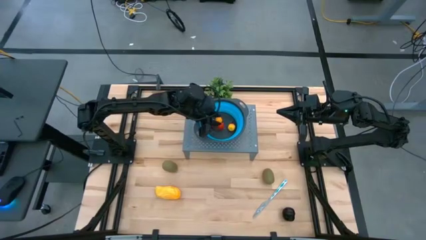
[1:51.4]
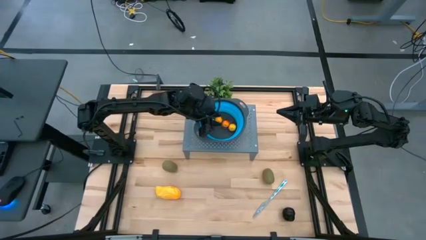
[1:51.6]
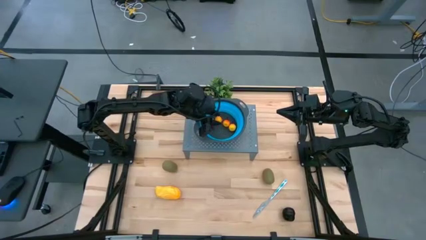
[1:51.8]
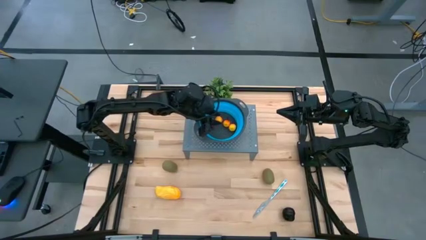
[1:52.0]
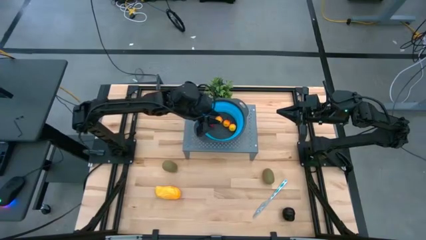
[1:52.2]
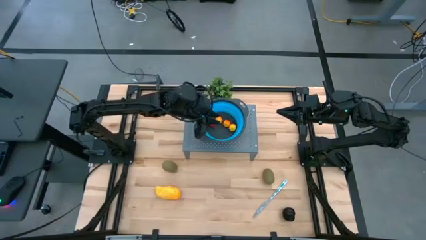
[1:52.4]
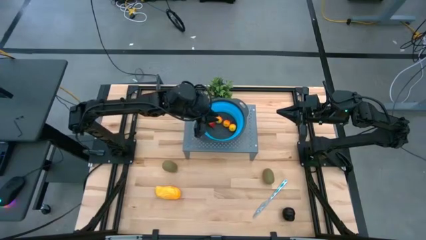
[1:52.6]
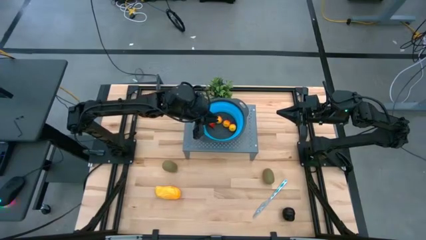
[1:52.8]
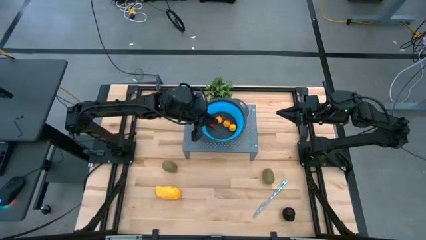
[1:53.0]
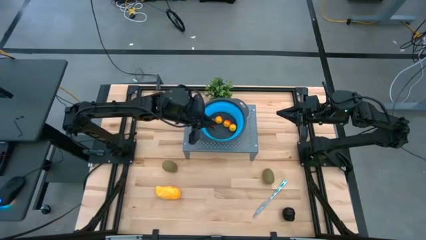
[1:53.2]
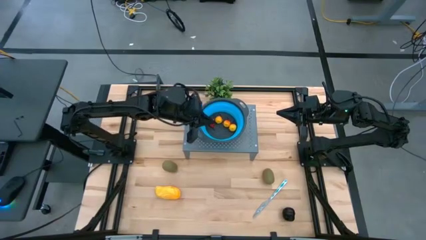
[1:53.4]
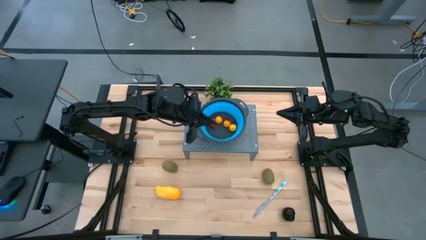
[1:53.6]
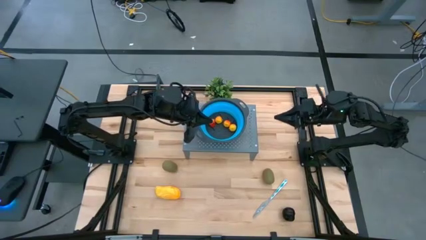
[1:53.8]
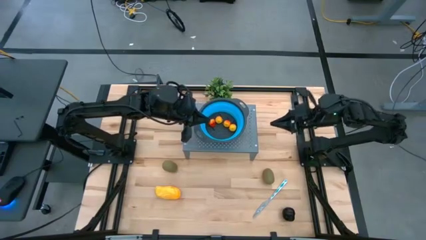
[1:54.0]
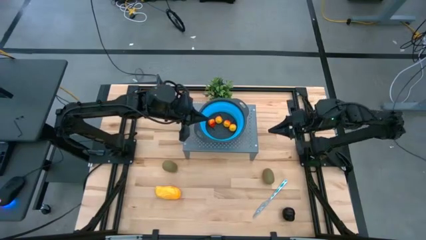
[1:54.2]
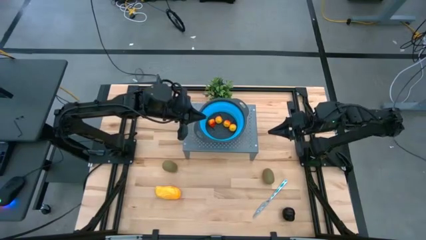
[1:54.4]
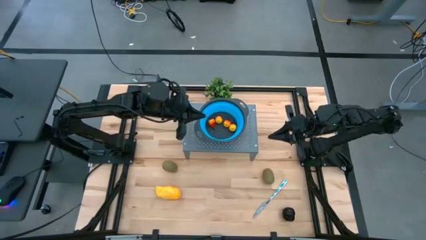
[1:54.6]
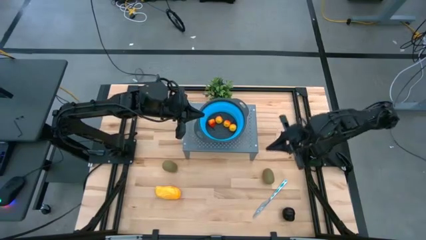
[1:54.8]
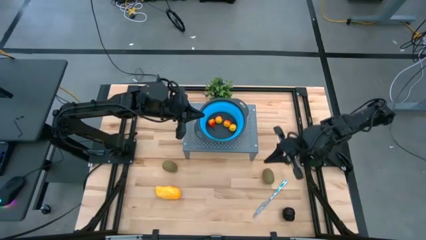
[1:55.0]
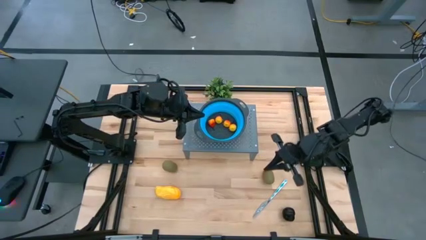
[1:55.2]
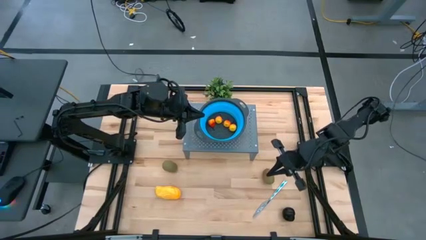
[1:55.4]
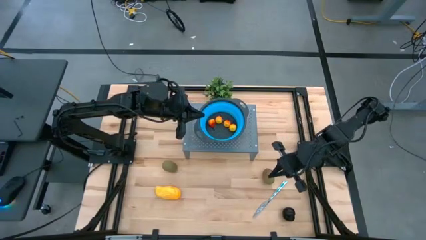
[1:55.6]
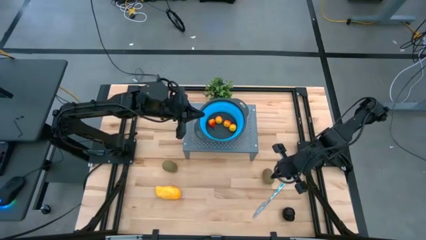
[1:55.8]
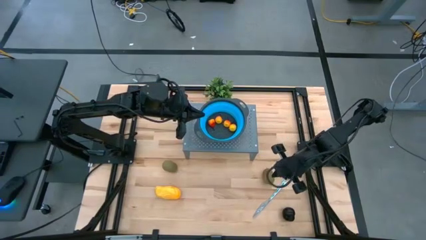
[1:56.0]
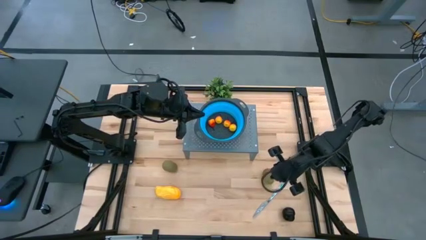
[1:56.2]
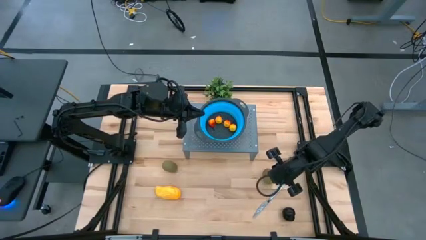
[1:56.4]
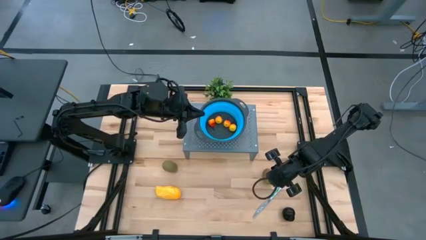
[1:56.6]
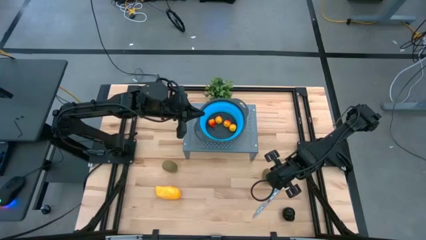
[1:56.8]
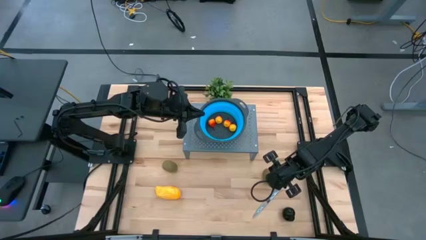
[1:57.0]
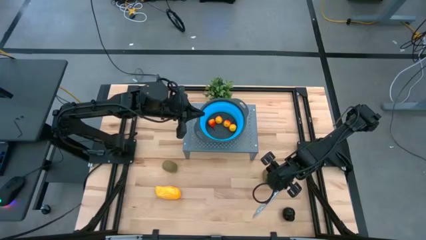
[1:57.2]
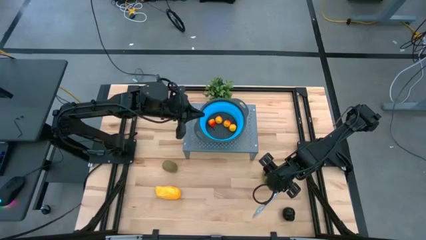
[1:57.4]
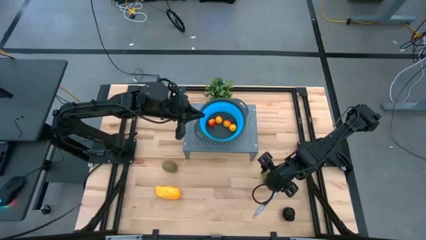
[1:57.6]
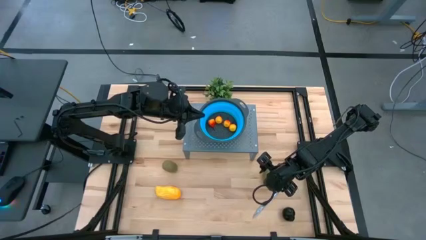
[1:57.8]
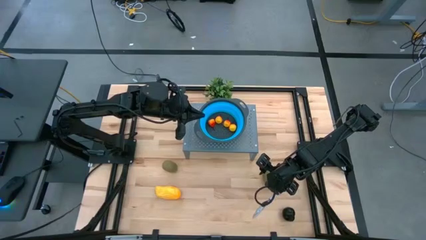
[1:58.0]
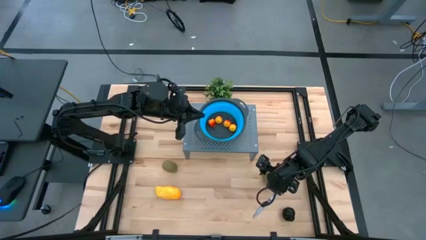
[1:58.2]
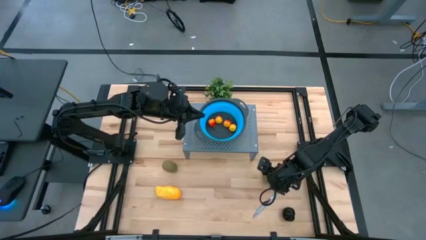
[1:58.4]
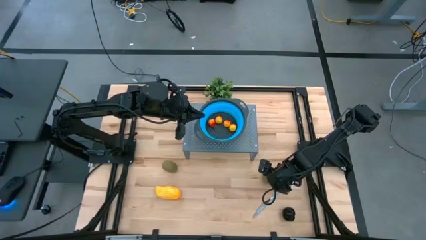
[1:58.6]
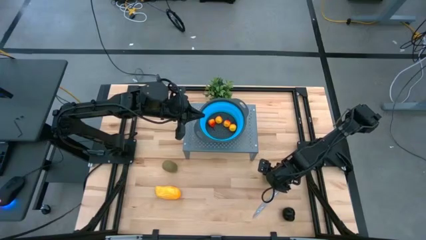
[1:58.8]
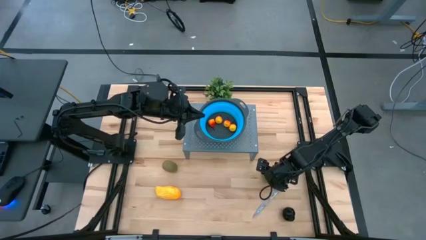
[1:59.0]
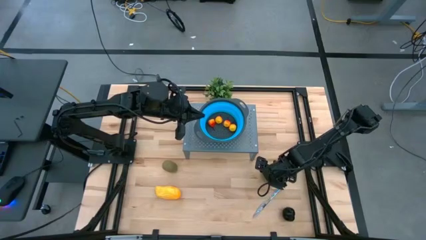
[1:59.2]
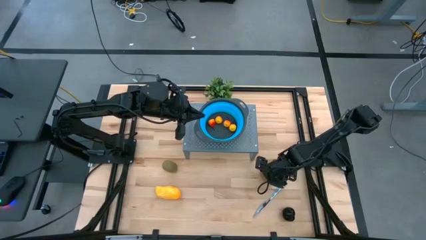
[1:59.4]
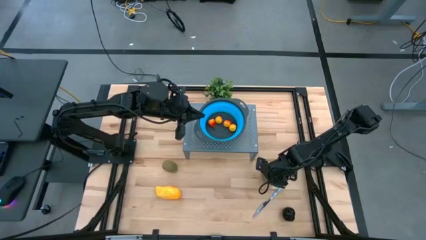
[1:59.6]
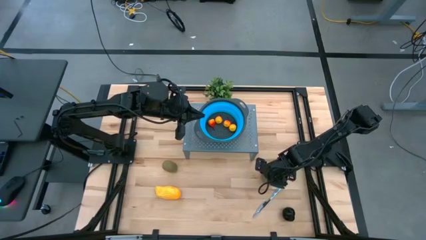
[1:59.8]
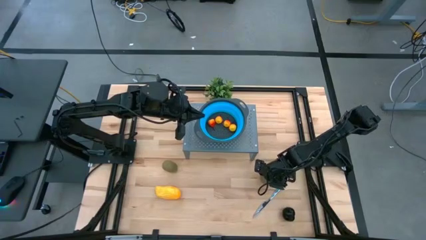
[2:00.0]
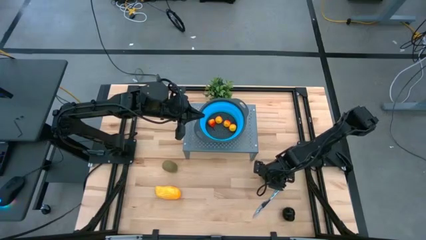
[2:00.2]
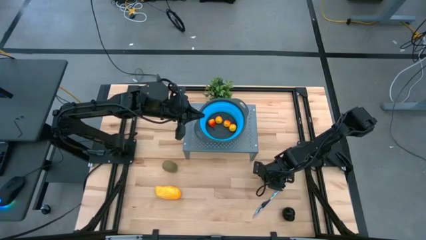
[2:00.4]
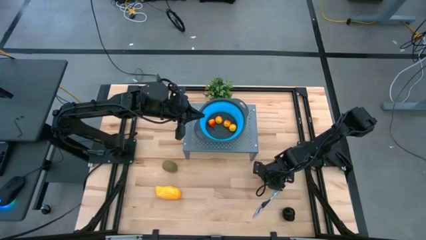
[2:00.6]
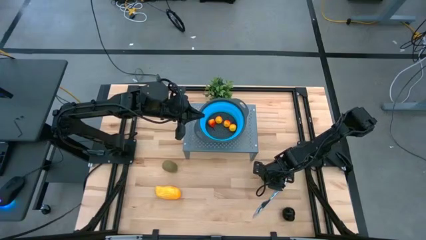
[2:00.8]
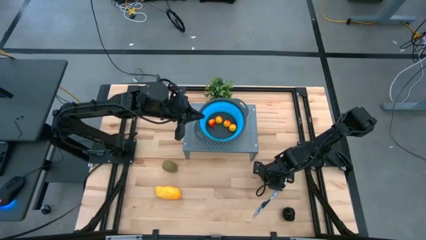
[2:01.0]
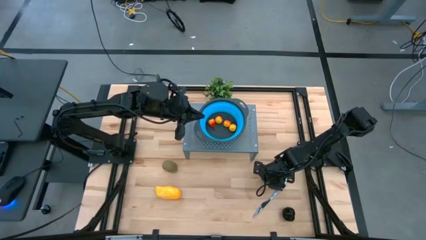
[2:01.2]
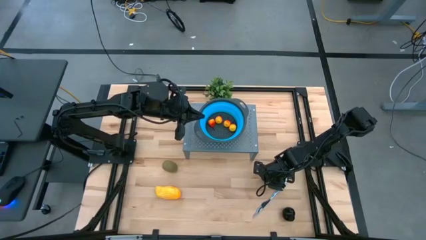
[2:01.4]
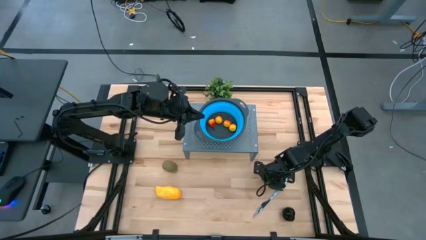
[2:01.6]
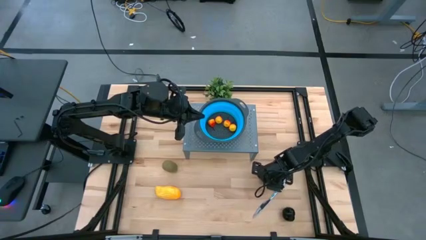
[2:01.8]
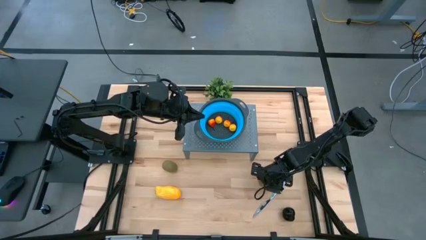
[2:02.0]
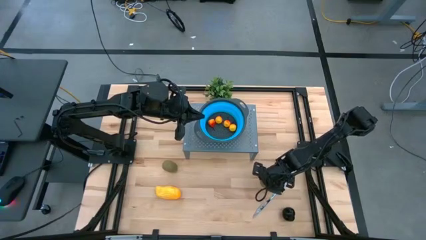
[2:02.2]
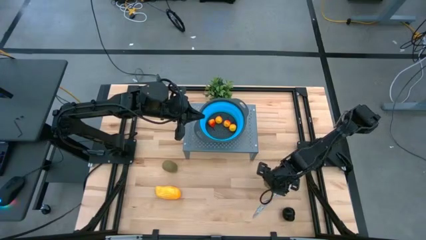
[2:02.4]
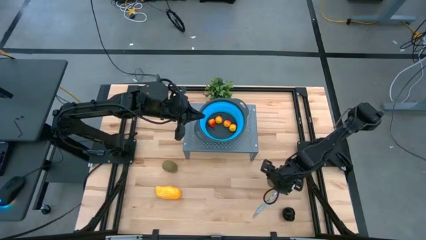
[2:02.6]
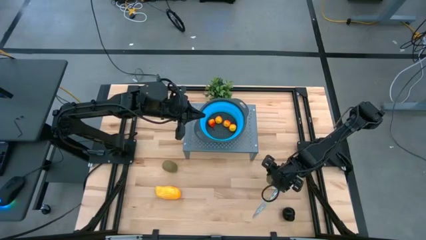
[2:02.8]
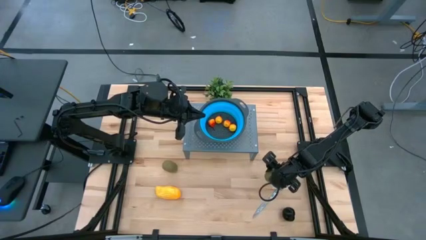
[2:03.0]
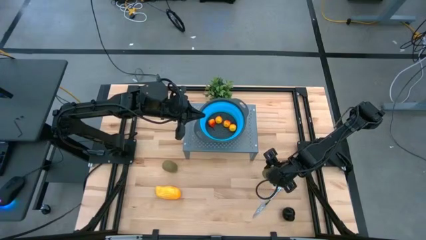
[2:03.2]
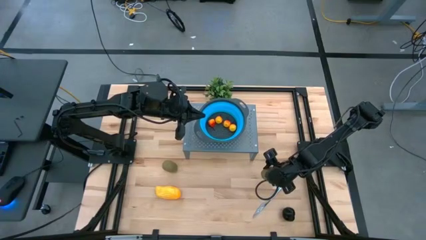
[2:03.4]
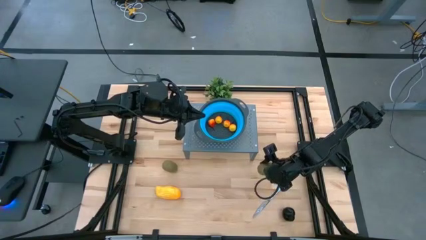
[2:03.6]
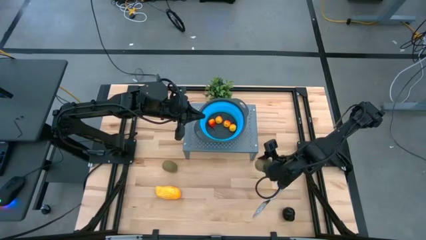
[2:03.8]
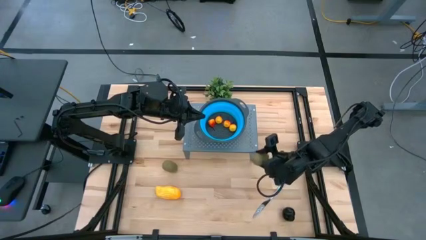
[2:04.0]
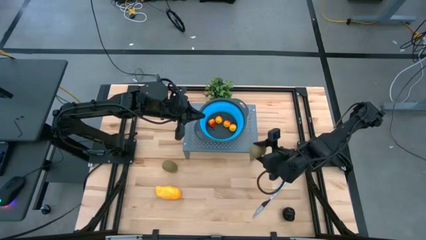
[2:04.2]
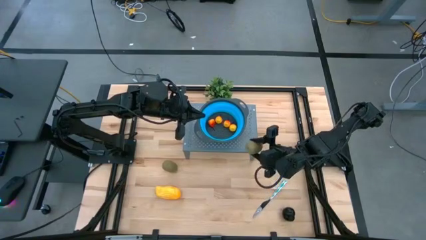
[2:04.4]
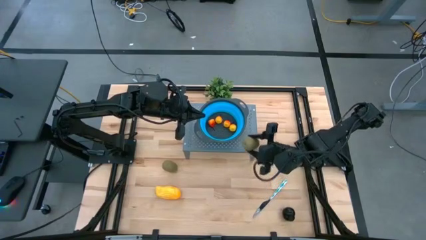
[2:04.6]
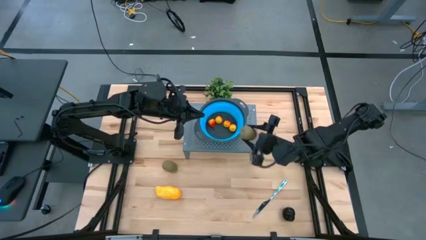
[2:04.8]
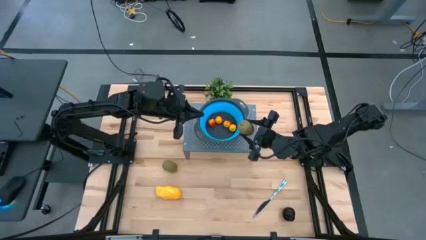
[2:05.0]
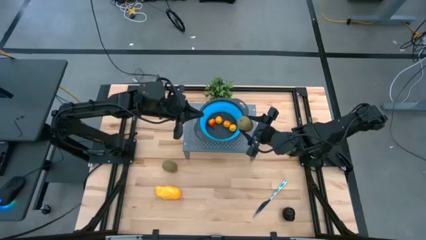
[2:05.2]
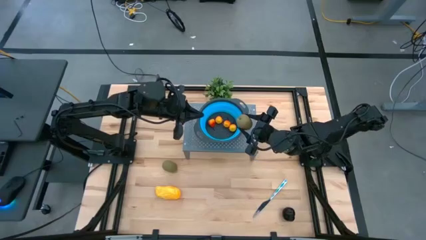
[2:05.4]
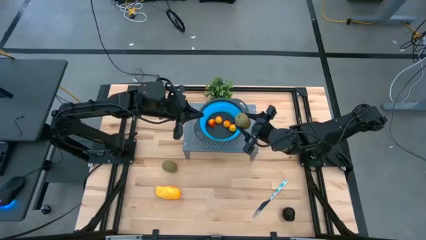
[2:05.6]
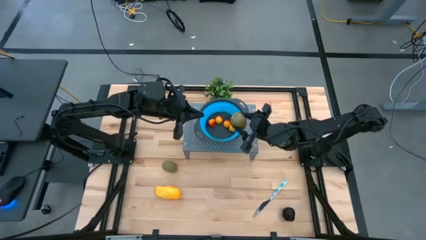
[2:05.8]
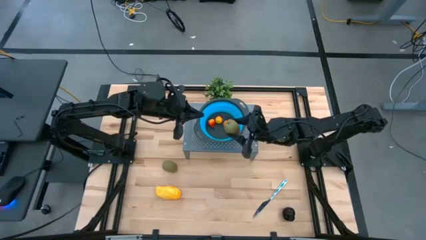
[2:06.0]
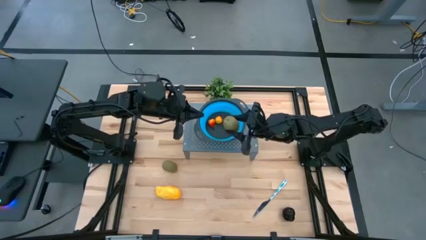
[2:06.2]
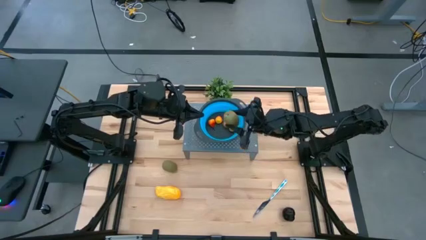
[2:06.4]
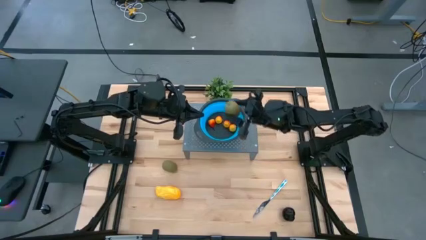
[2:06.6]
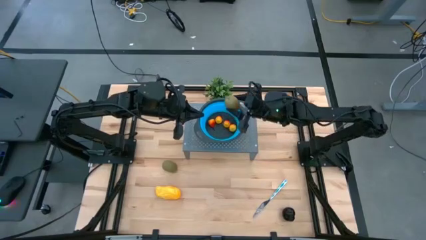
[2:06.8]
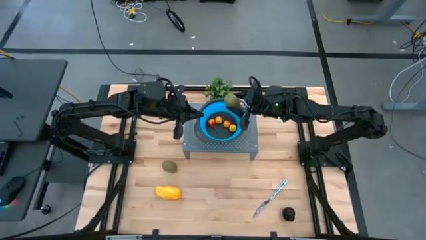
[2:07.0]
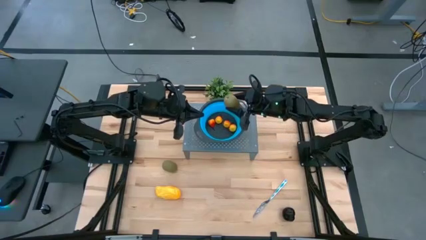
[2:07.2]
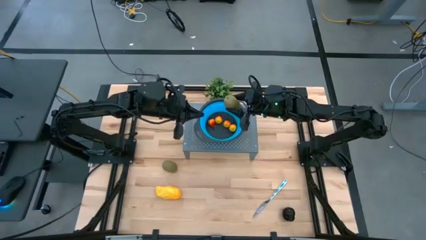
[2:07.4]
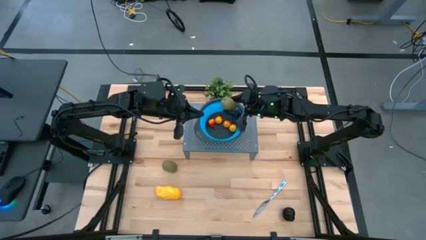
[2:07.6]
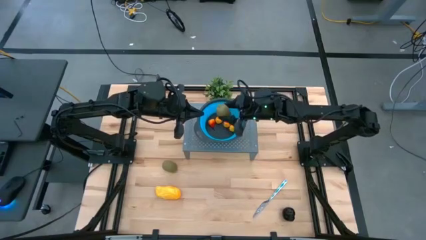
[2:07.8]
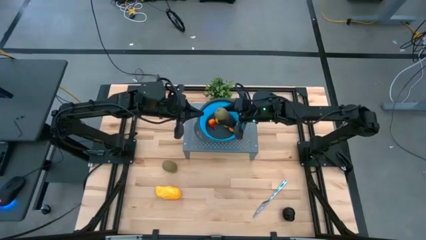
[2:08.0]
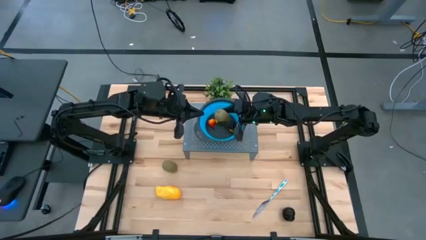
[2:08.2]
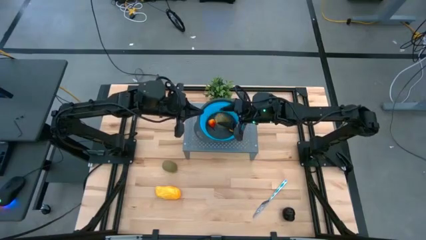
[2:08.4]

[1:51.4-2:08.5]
Task: Pick & Place Fruit
Put the right green kiwi into the strainer bowl on the shelf
